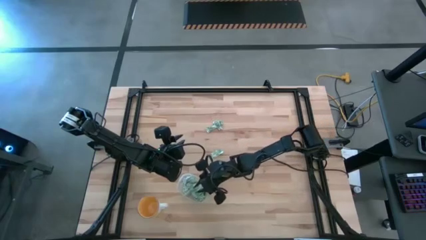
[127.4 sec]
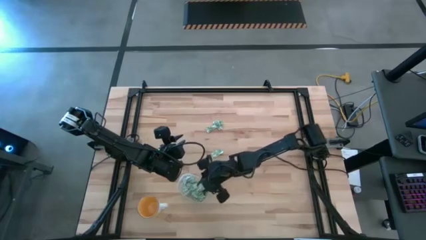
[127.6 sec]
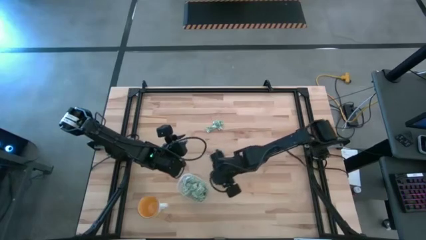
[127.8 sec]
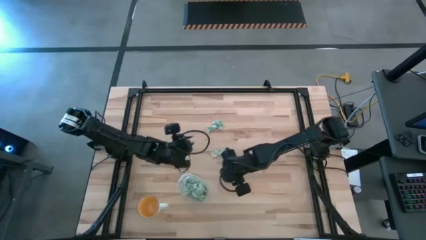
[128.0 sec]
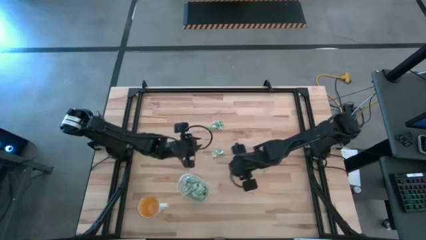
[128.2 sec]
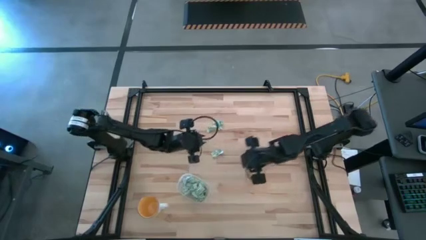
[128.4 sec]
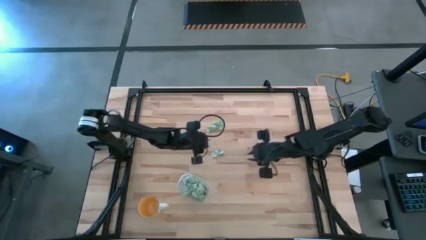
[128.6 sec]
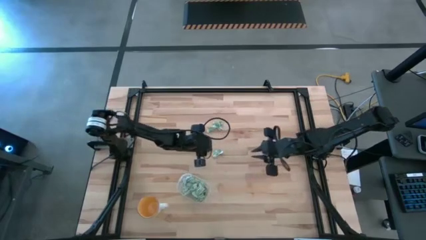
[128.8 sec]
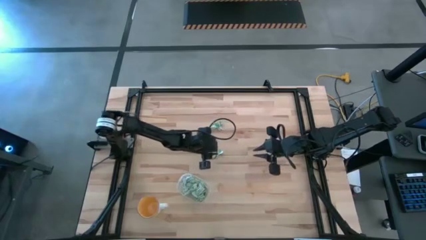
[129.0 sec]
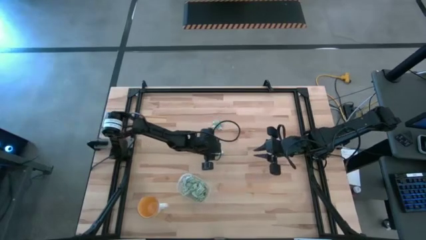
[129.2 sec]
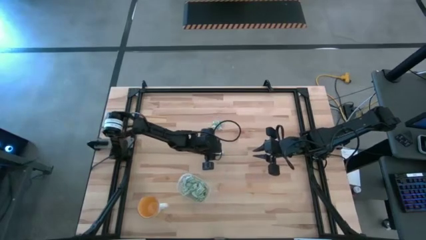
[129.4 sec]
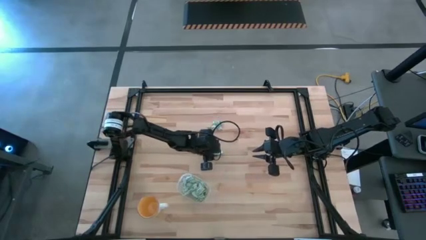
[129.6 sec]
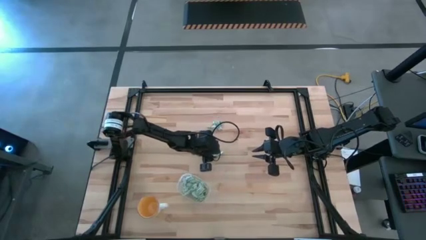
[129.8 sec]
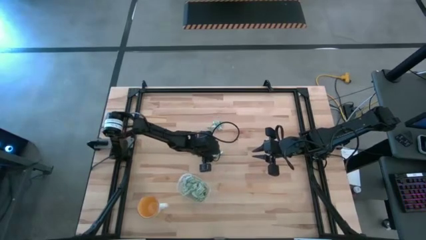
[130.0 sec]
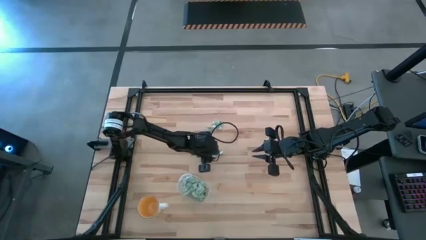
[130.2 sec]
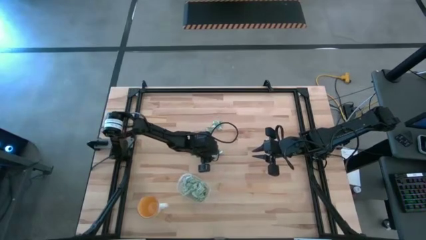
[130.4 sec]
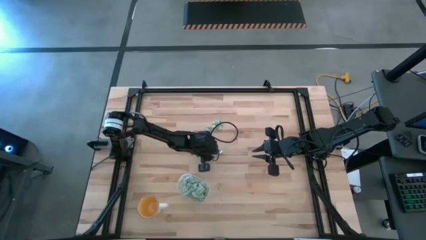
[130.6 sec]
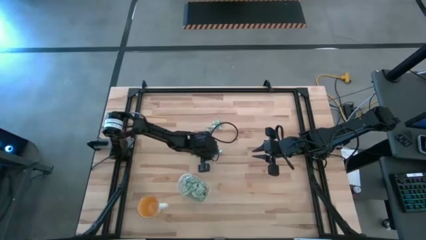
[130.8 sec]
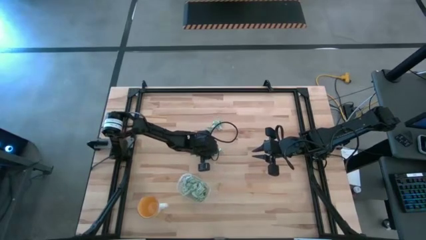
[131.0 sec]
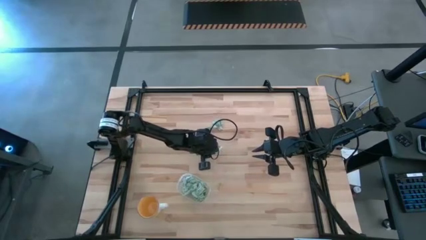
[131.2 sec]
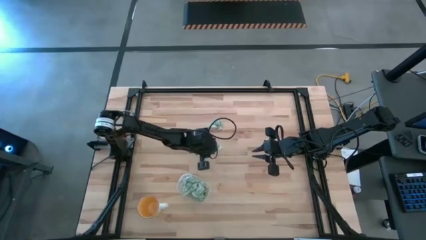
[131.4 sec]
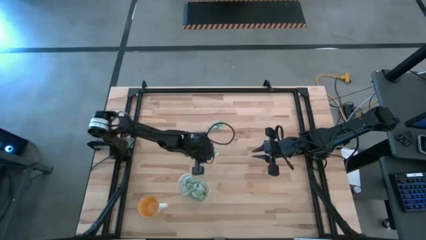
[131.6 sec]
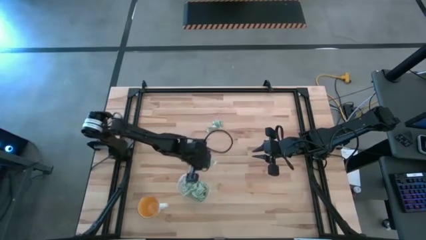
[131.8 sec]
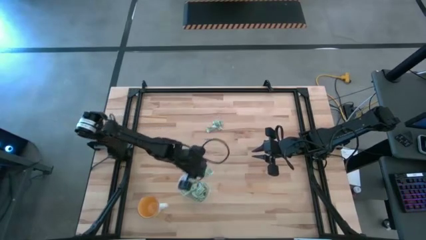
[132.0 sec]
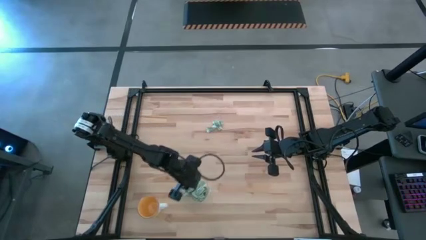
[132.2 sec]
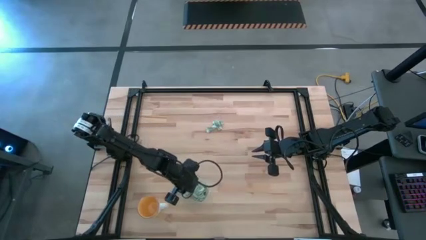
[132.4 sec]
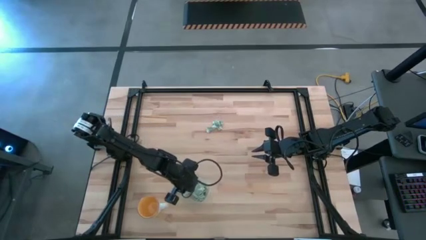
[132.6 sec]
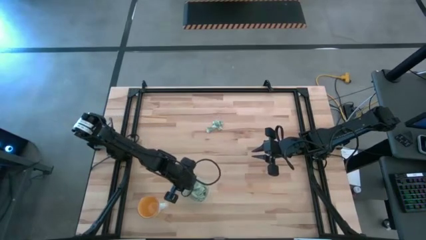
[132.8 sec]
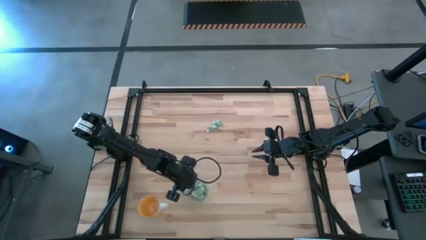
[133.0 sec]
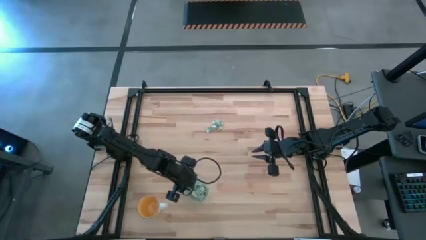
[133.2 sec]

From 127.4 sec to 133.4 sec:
Task: Pick and place Stevia / Truvia into bins
Put the stevia packet into the transparent container

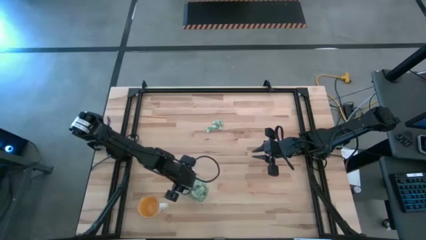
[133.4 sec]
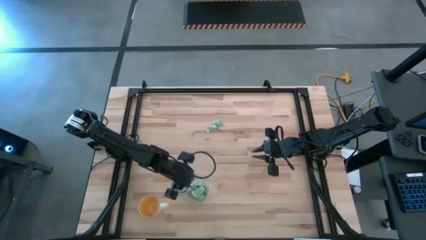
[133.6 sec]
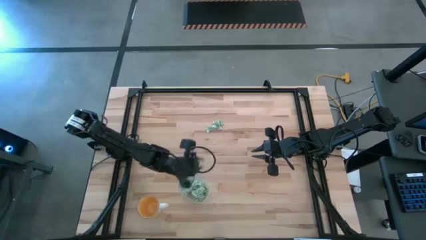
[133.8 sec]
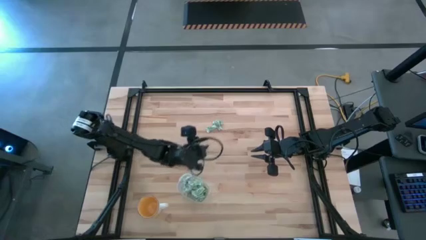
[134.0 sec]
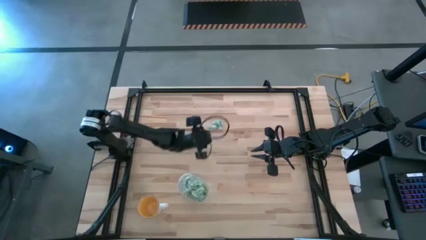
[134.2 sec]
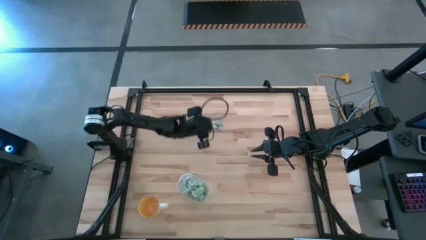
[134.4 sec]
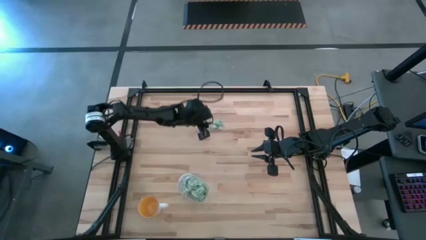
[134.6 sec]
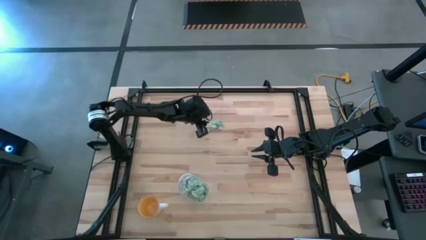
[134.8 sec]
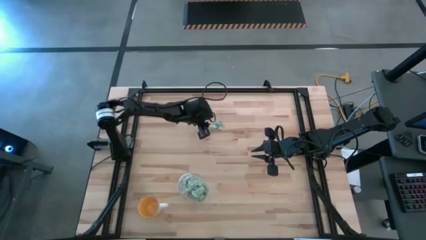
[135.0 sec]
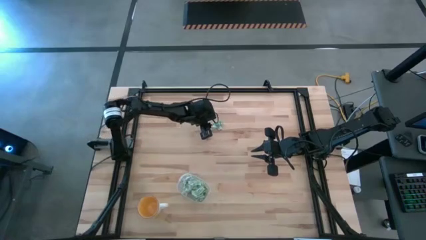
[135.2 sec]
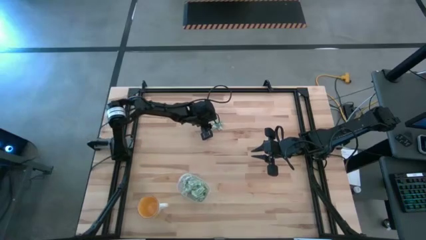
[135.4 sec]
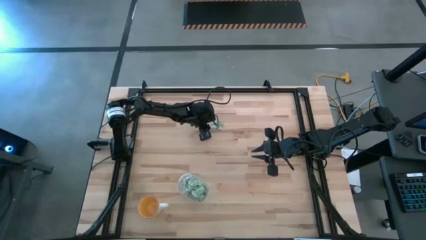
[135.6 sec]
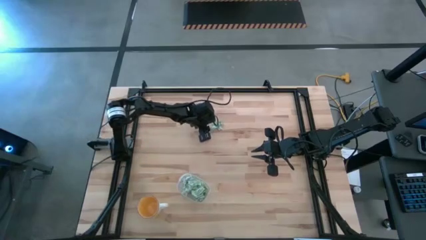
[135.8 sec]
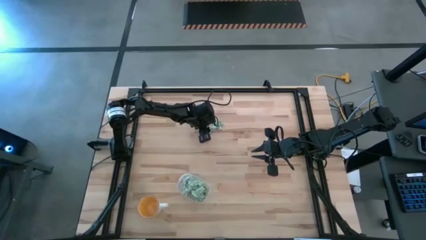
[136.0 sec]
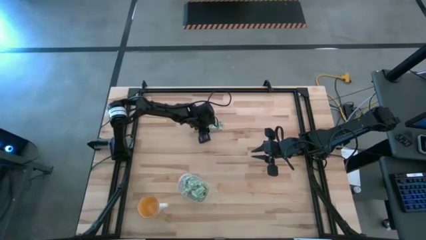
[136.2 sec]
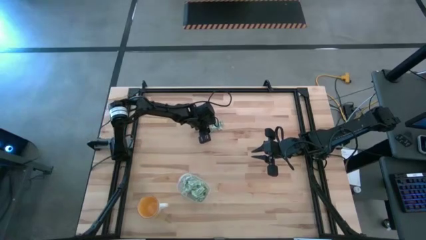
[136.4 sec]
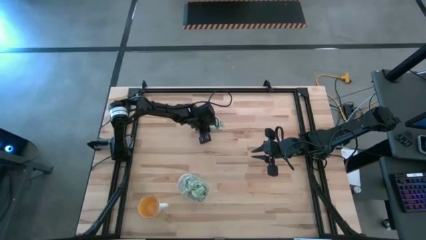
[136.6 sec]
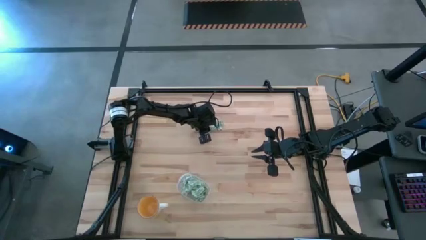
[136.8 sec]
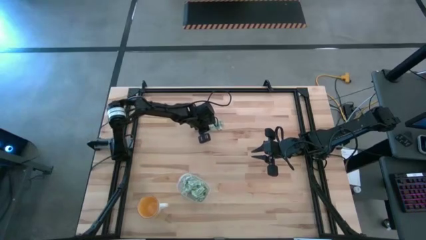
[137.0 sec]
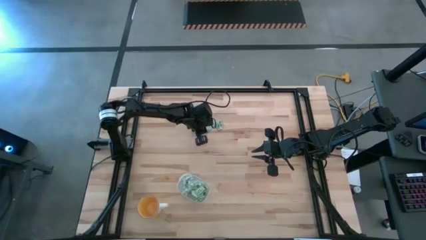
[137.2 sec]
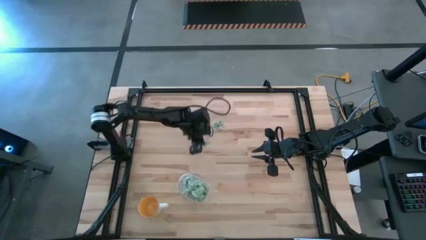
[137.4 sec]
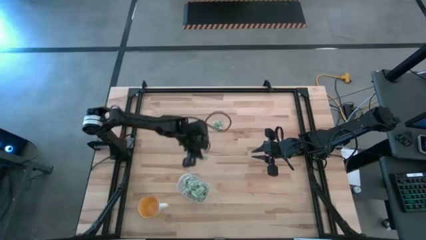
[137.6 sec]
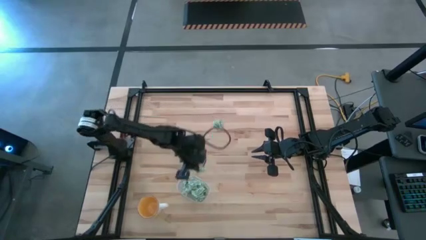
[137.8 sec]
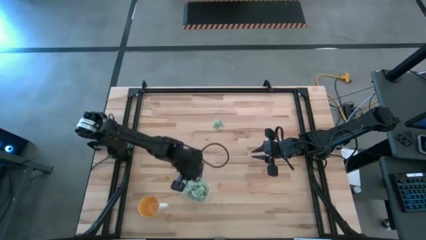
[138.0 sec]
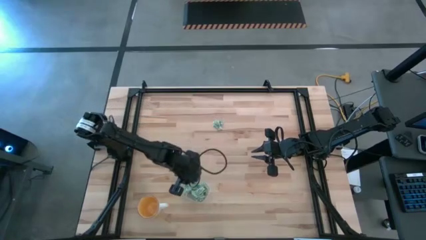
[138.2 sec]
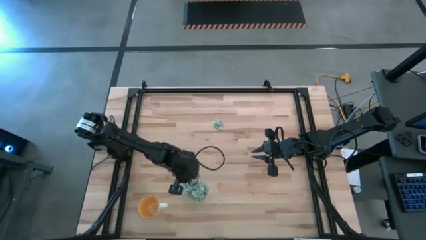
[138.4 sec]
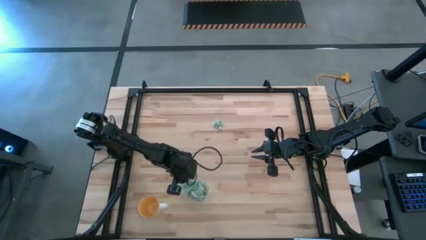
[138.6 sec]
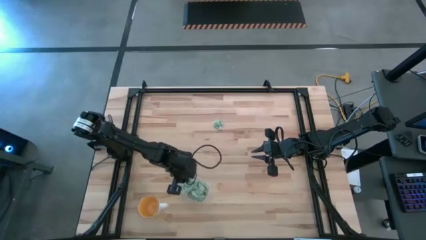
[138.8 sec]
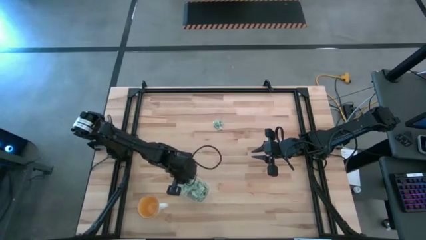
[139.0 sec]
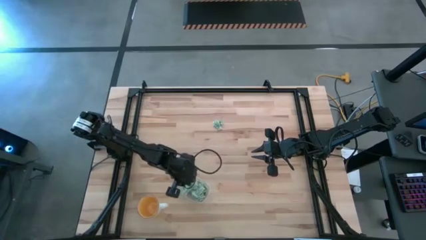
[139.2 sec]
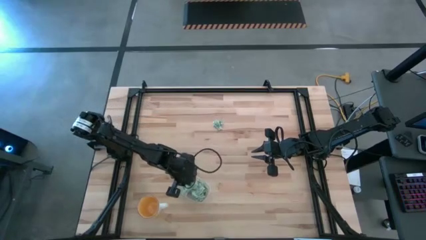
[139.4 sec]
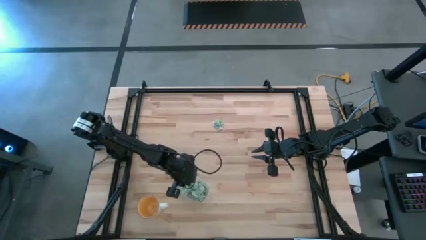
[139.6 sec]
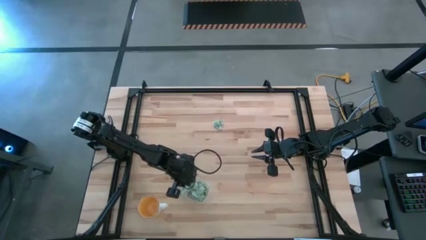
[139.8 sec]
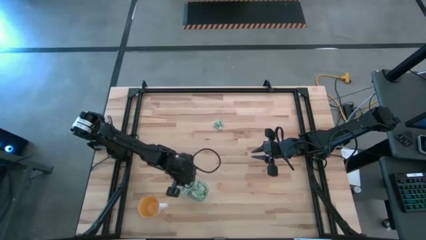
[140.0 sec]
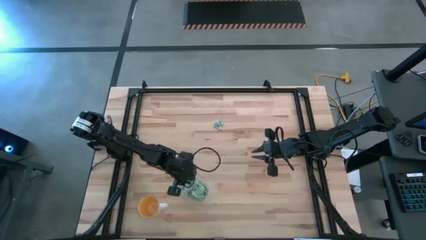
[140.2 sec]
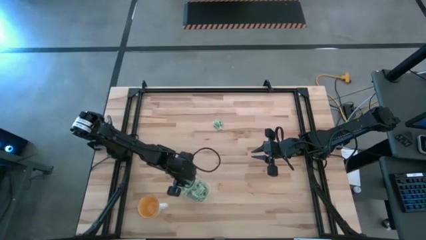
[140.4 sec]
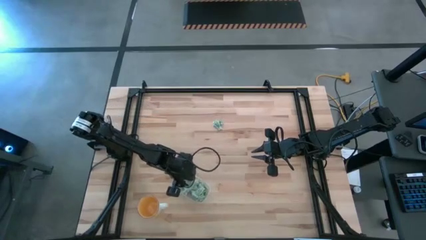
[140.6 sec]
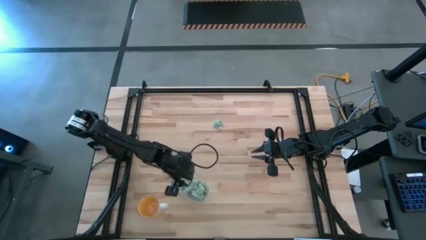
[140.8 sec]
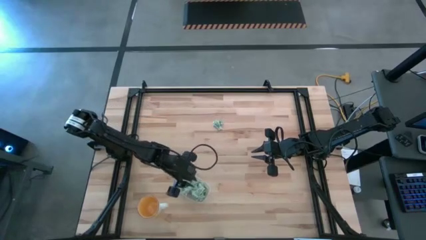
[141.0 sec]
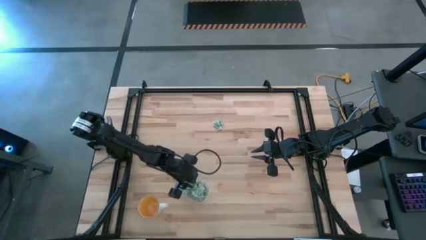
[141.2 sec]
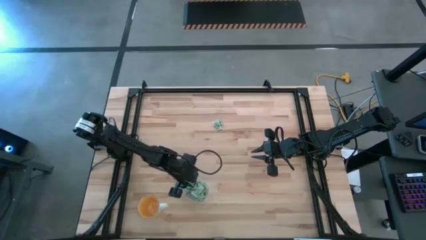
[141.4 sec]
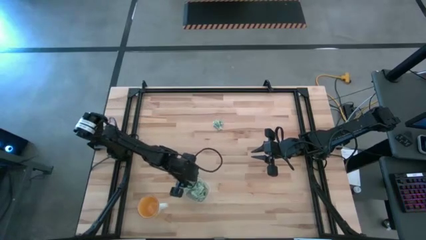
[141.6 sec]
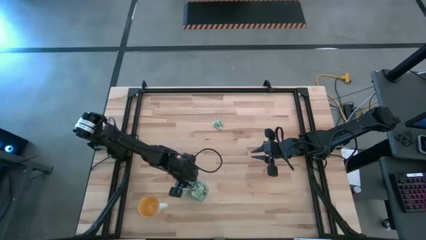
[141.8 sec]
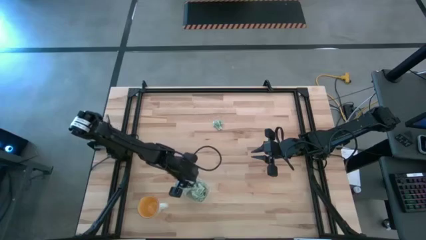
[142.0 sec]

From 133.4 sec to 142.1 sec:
Put the stevia packet into the transparent container

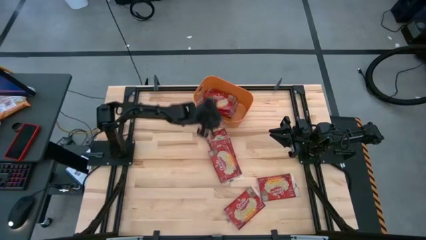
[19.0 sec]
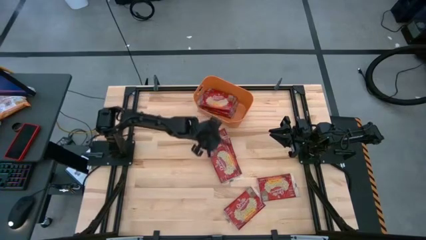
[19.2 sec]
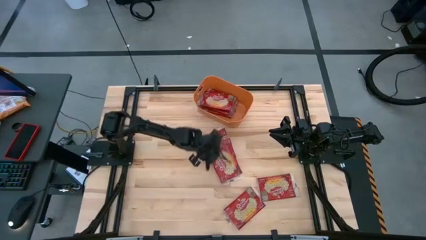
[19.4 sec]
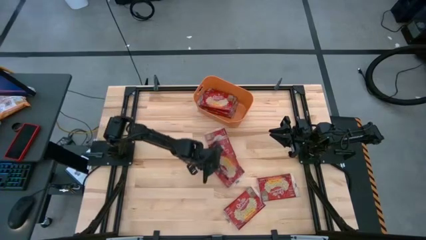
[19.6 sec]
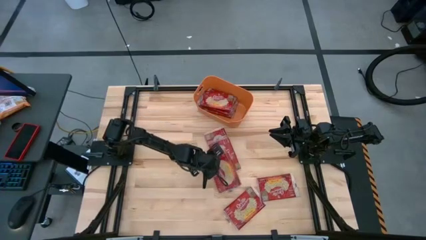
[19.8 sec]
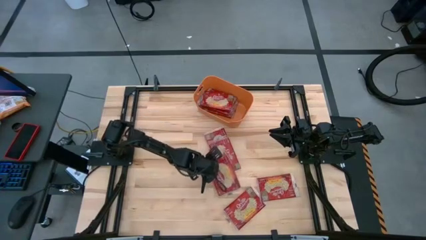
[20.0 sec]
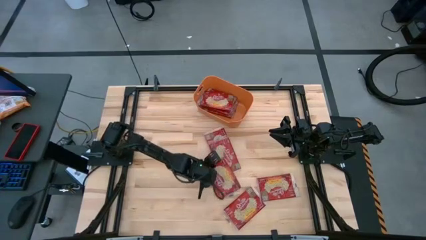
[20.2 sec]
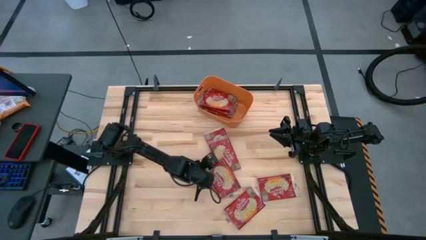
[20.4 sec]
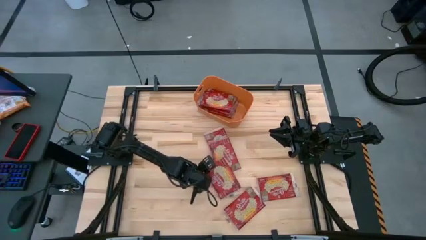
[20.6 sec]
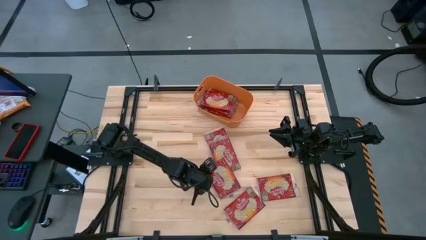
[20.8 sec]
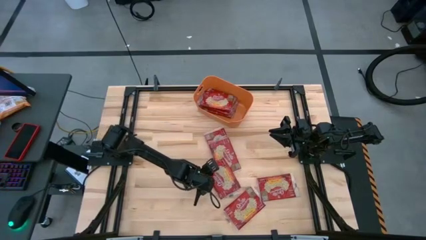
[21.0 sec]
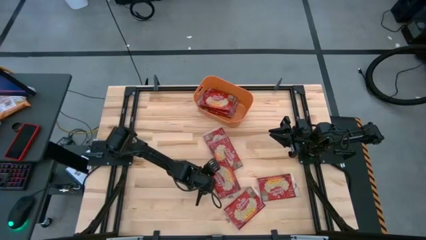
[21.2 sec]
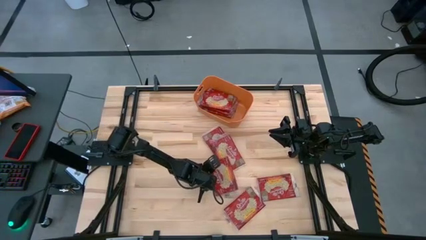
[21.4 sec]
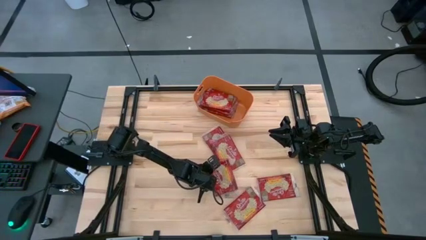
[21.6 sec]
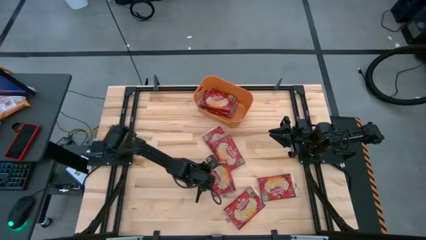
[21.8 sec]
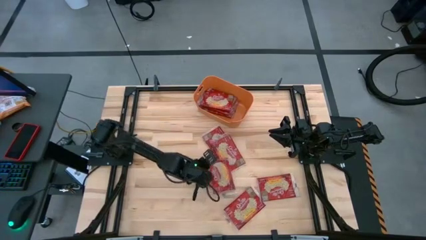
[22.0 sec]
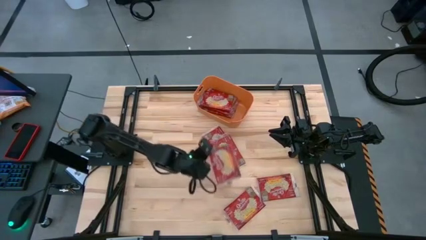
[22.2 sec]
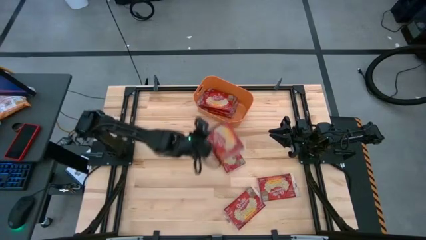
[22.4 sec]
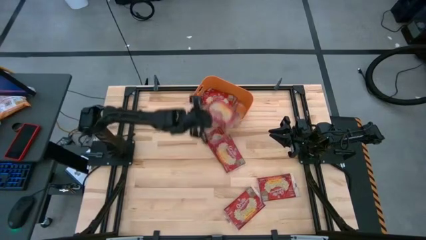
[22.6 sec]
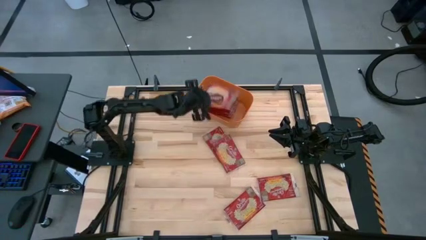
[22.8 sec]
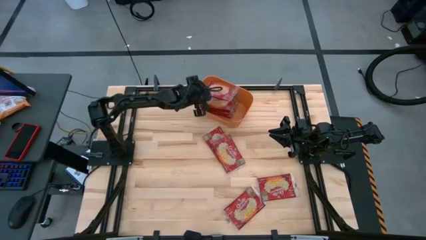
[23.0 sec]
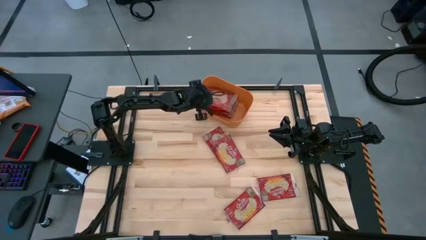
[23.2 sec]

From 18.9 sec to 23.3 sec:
Task: Sort popcorn bags into baskets
Put the red popcorn pack into the orange bin
